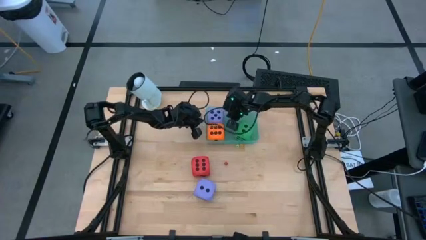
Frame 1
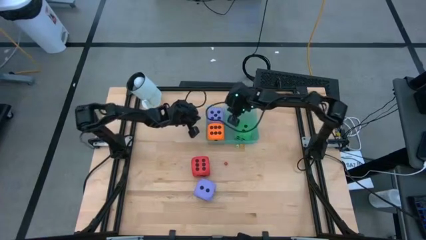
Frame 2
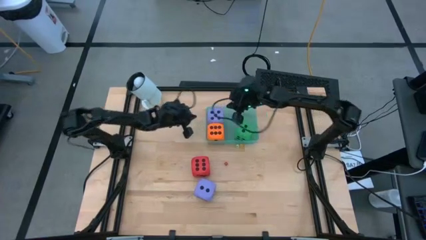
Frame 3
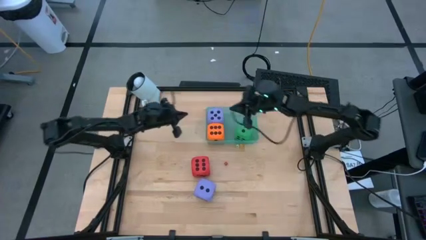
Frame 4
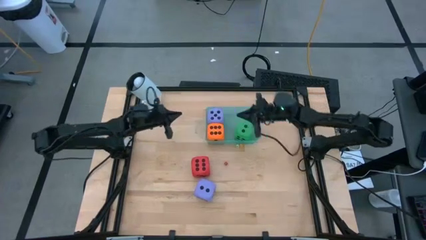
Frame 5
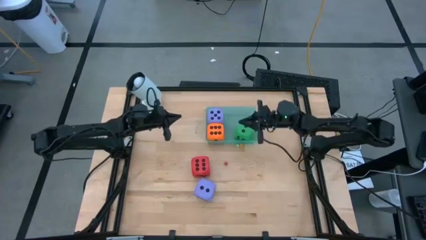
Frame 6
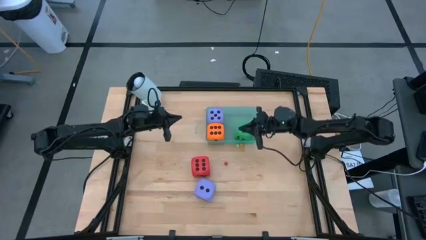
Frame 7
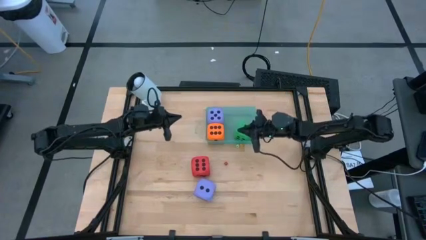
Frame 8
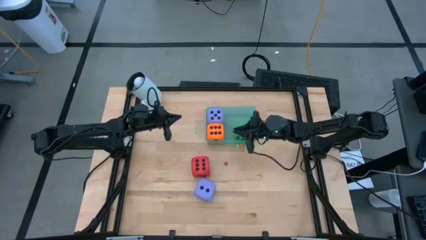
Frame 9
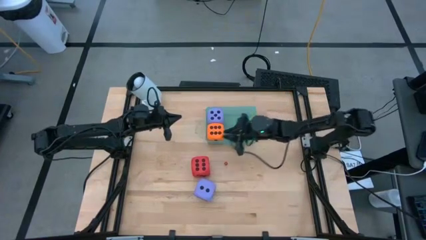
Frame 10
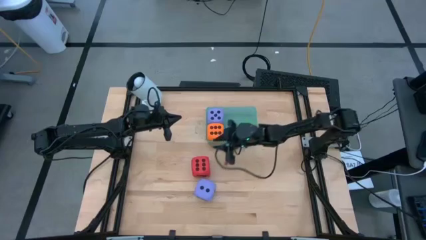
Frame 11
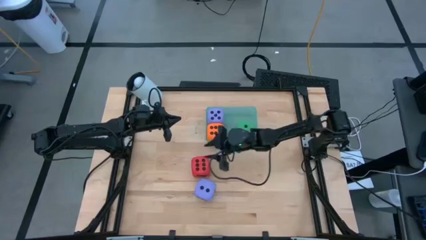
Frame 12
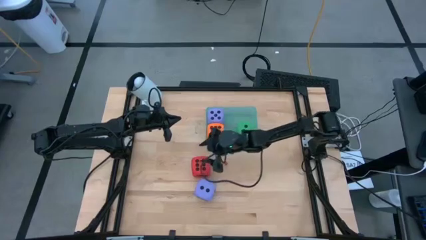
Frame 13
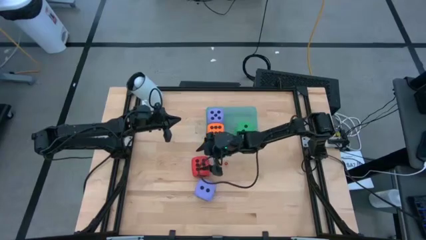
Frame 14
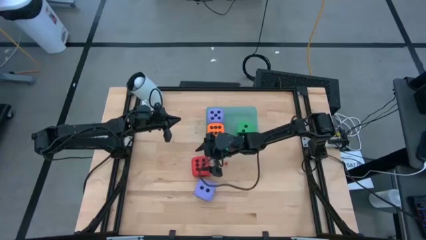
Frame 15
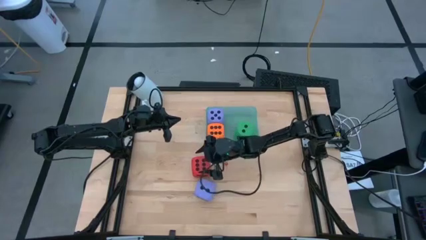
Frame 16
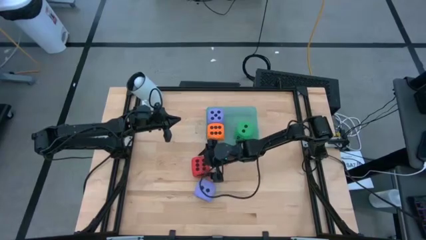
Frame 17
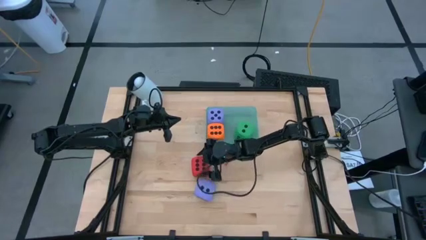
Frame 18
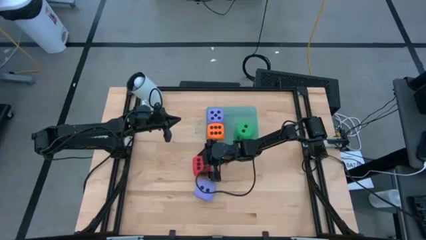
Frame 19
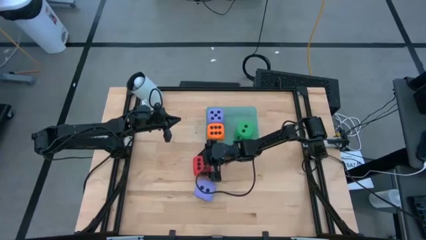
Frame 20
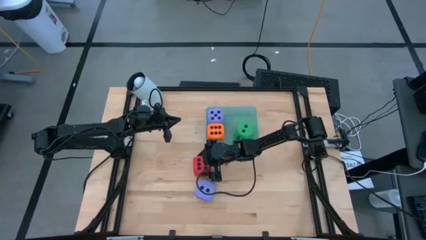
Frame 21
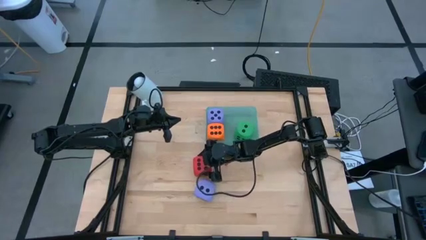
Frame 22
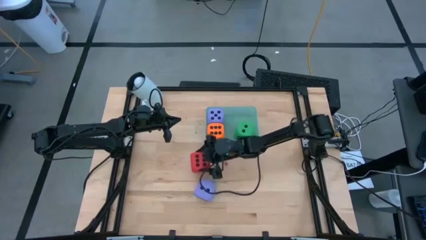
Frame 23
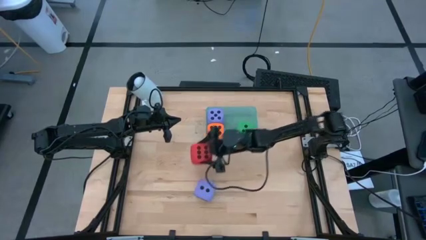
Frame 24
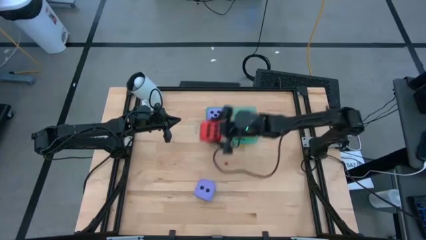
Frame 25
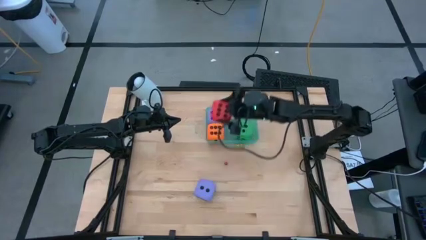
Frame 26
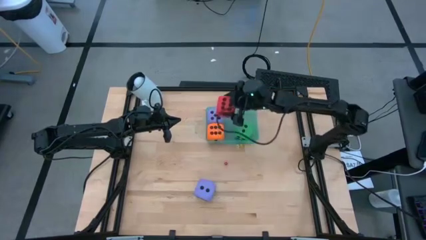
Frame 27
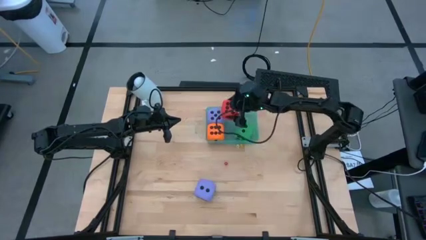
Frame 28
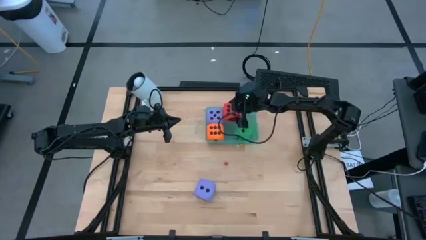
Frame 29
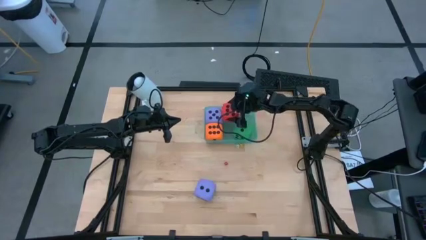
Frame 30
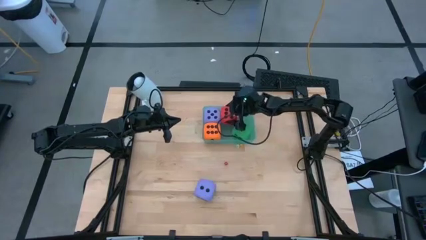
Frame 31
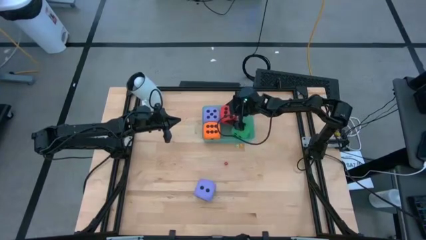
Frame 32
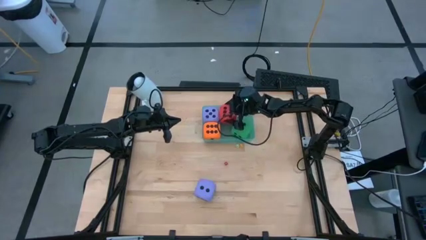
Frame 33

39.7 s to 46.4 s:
Task: Pick & Place Dice
Put the big red die into the green bin

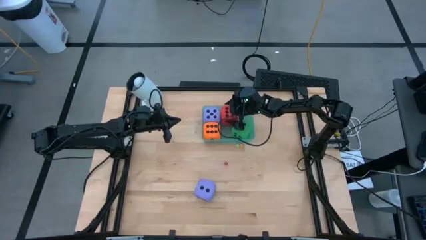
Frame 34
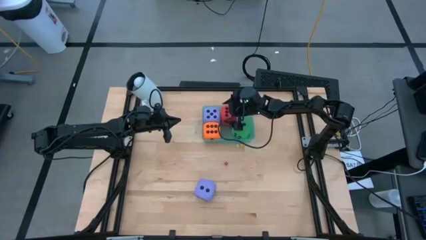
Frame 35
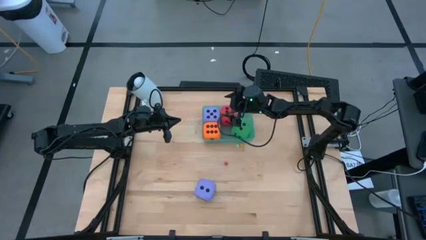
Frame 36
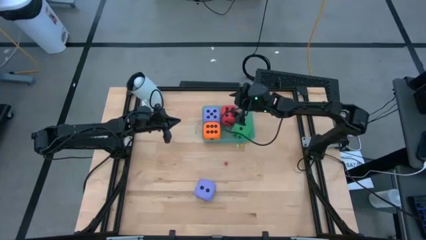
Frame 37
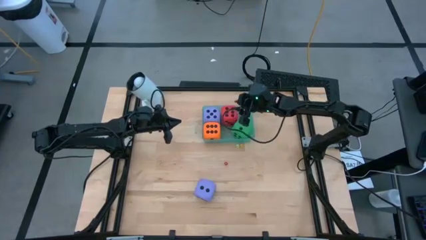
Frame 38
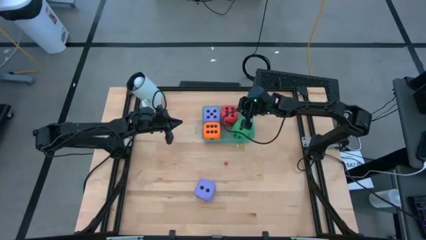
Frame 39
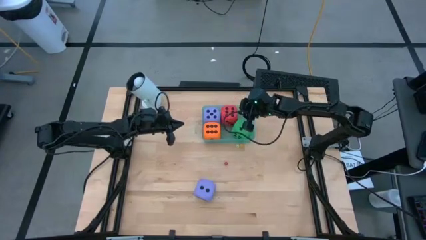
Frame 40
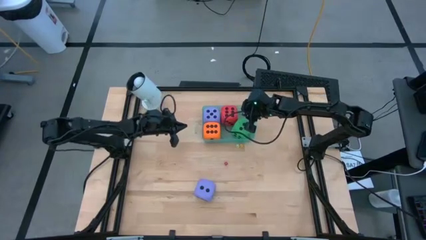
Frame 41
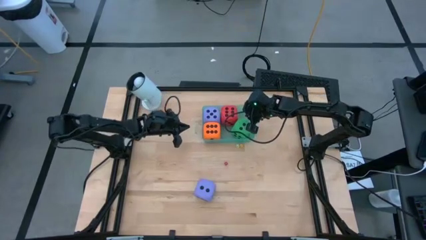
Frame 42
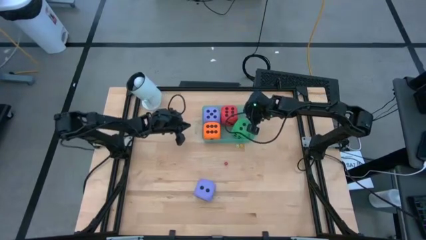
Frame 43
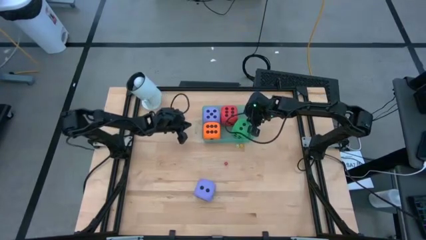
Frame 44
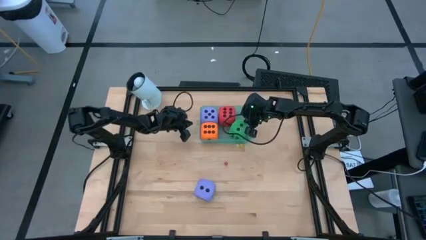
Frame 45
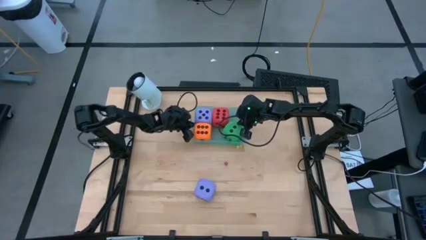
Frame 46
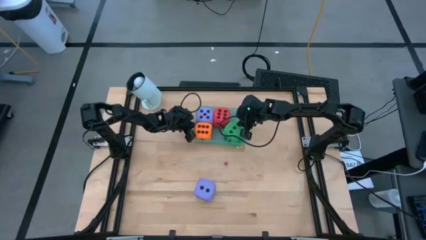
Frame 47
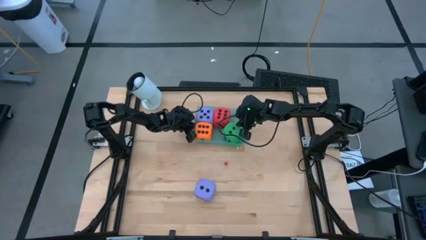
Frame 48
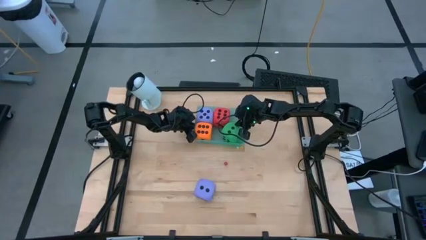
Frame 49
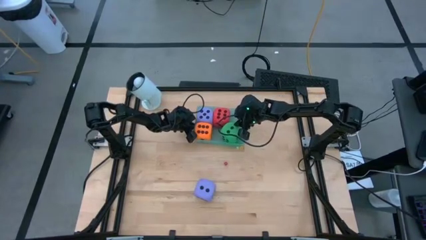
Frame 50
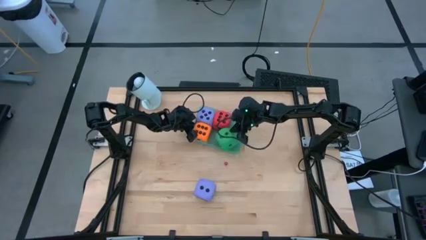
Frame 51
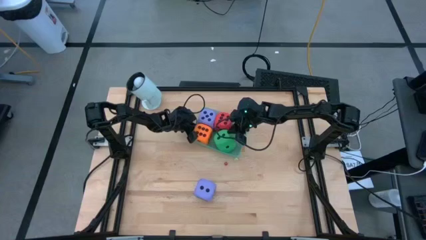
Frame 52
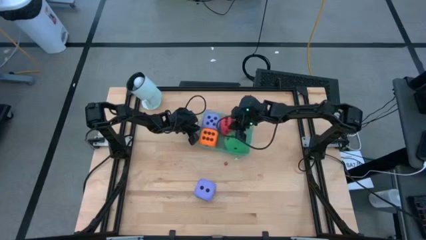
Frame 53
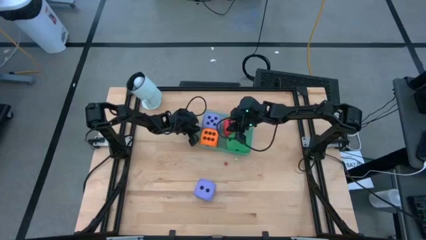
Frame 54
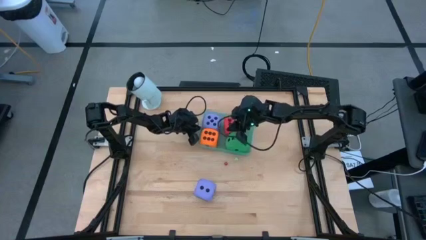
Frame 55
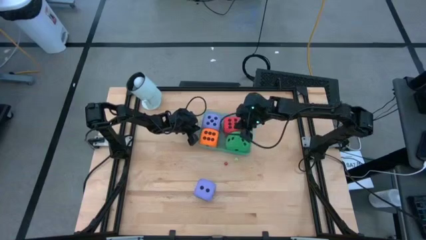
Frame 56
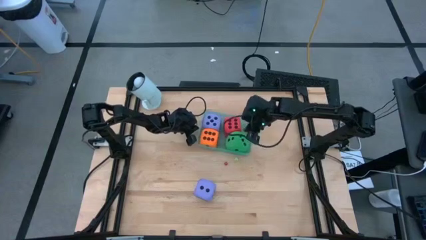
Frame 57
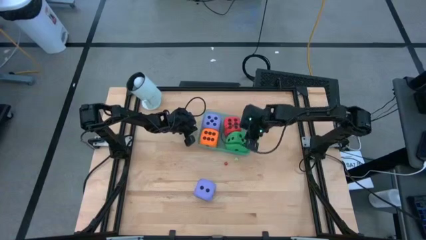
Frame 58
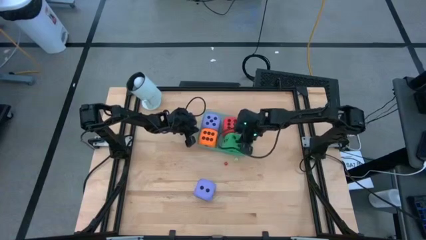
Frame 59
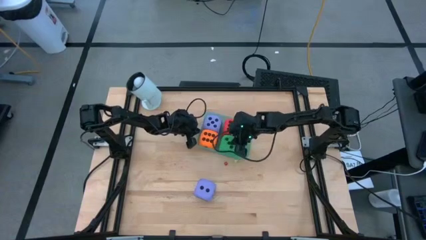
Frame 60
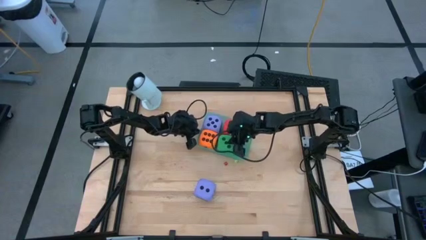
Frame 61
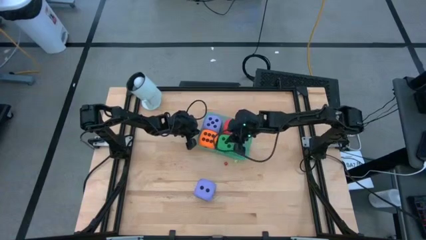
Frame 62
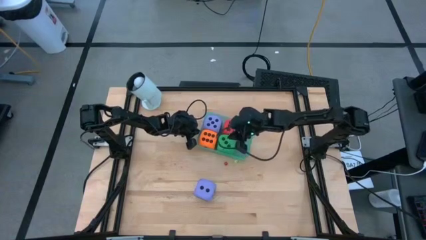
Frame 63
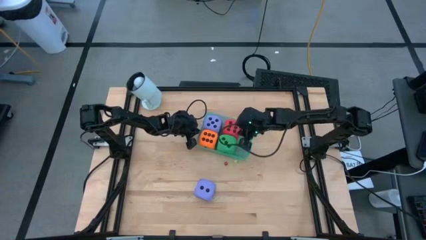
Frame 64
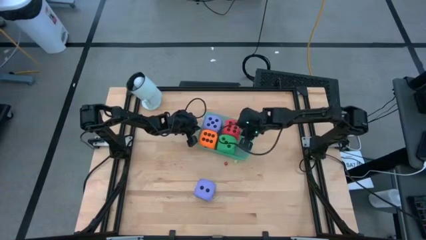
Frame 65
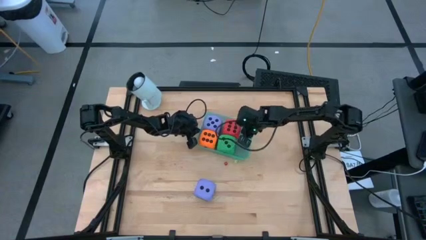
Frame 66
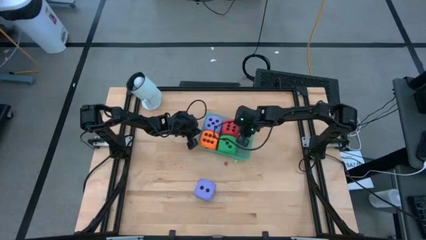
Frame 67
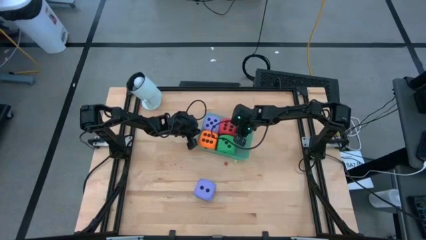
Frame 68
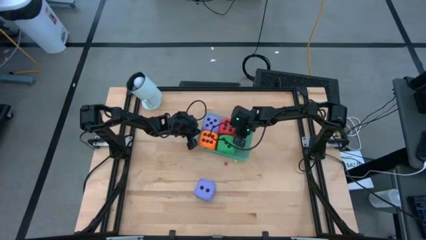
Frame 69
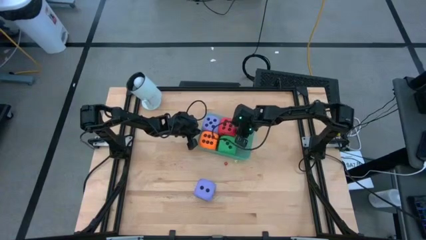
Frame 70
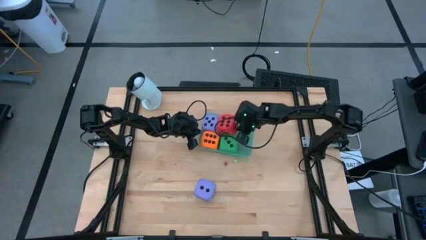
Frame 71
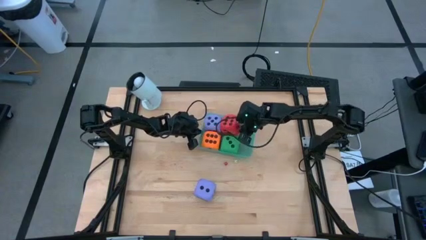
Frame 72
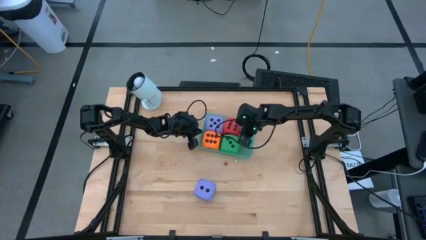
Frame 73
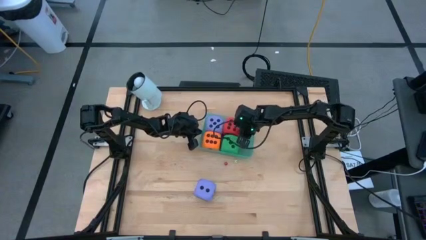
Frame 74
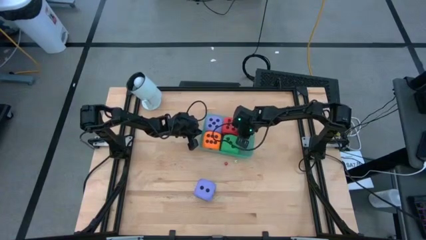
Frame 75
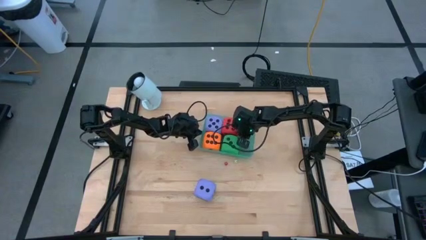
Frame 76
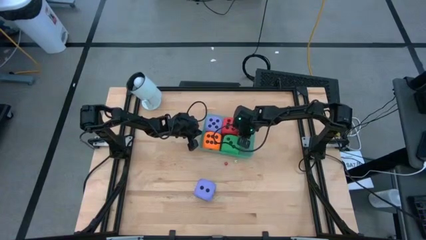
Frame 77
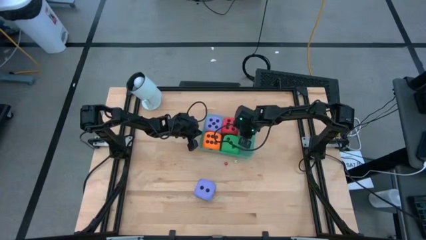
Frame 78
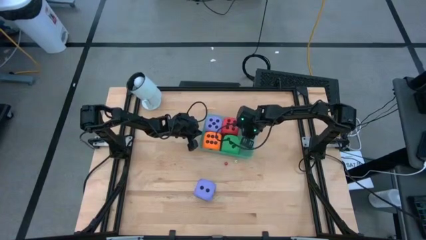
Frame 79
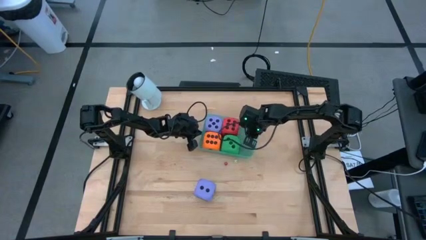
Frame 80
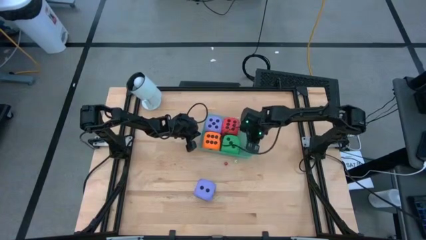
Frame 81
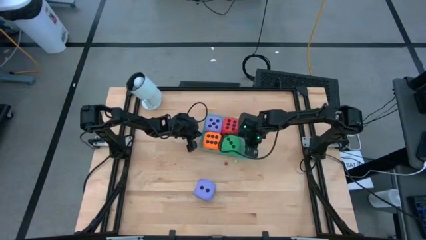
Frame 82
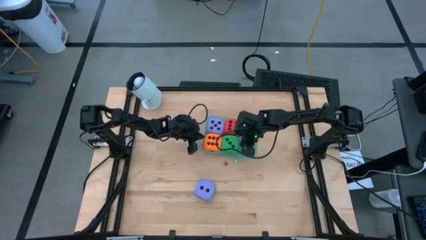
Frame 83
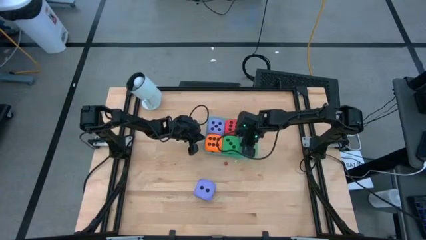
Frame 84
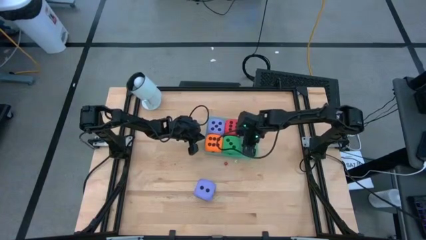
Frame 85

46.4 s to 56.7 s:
Adjust the big dice
